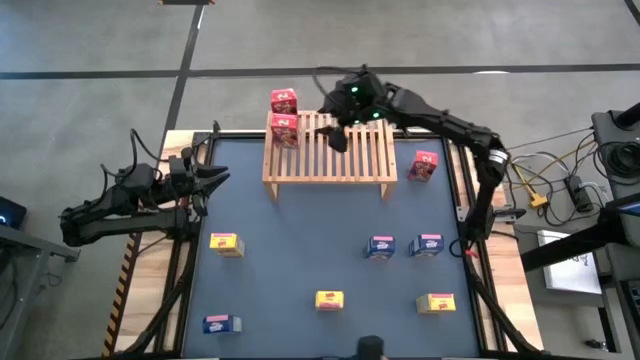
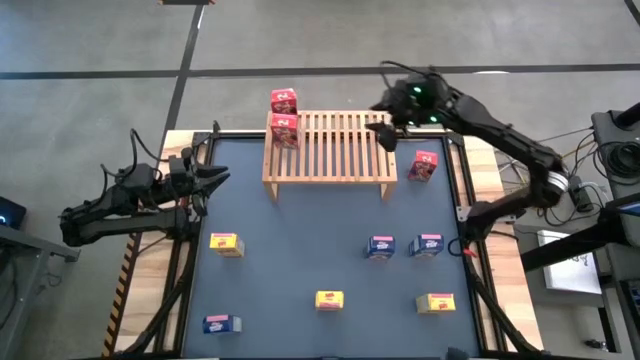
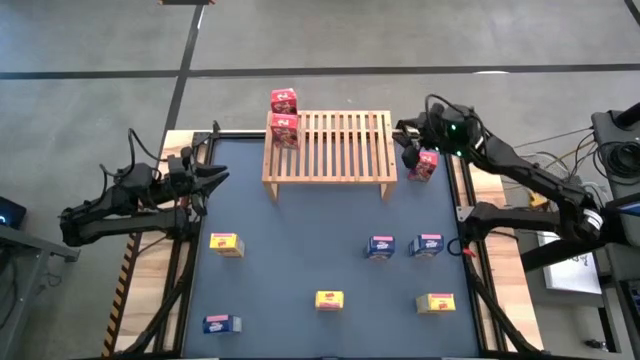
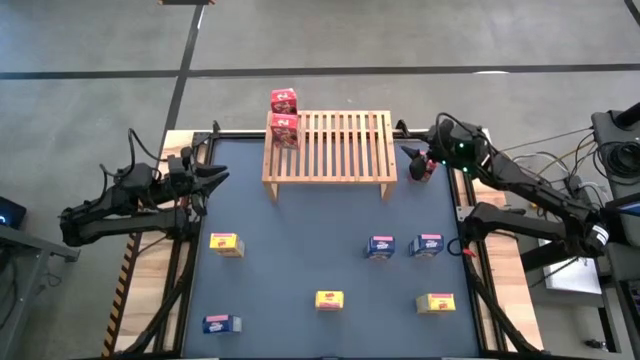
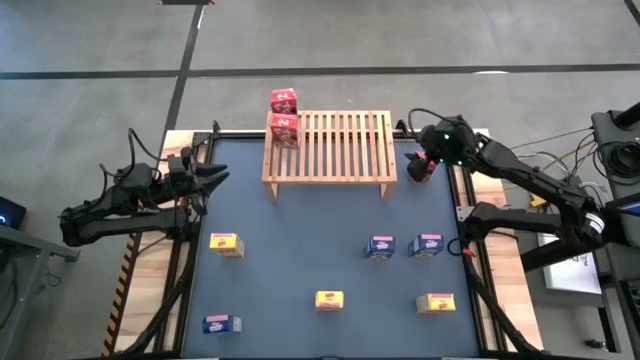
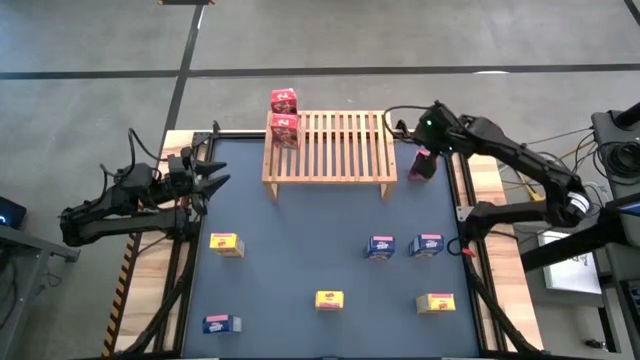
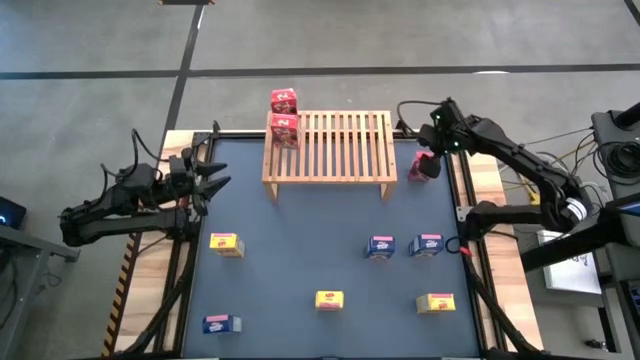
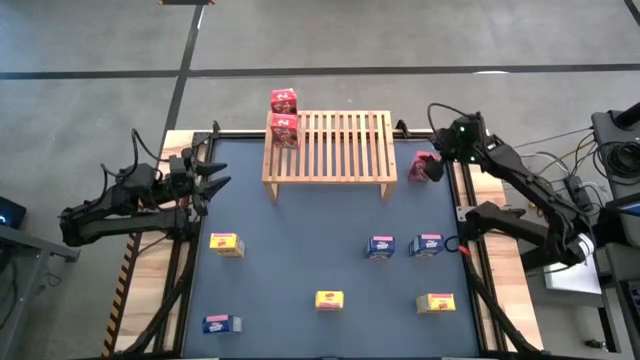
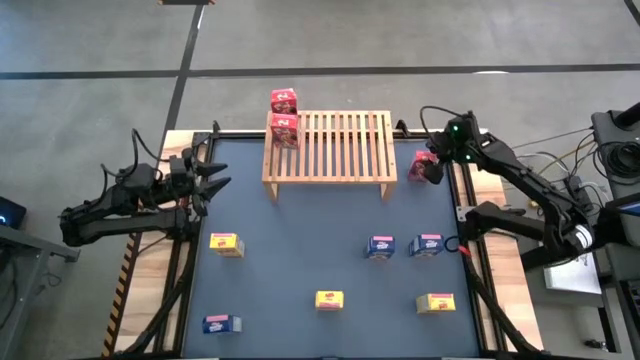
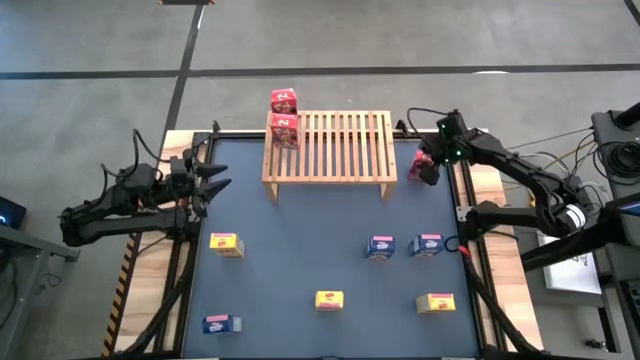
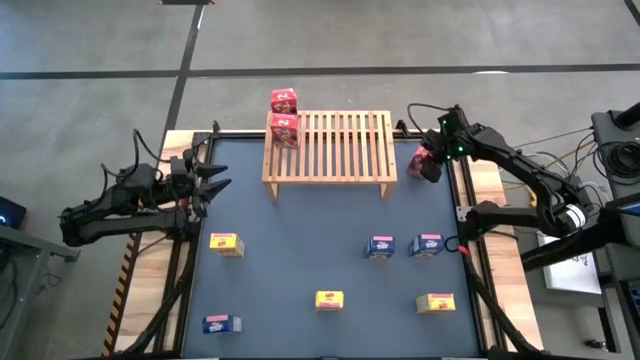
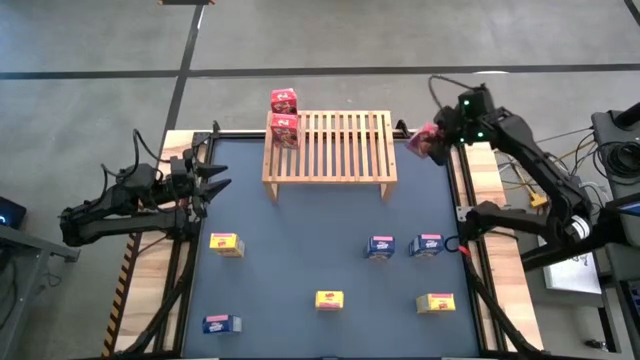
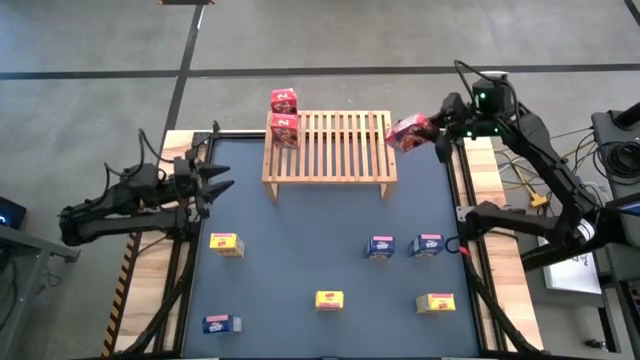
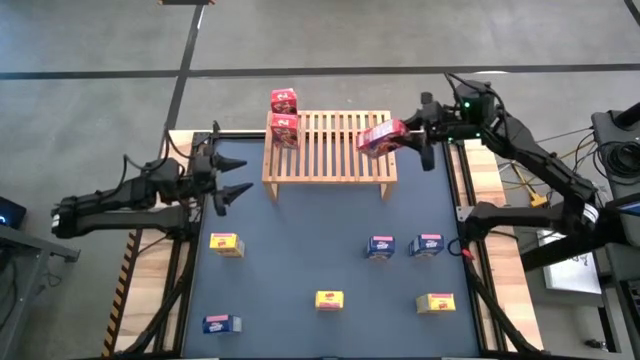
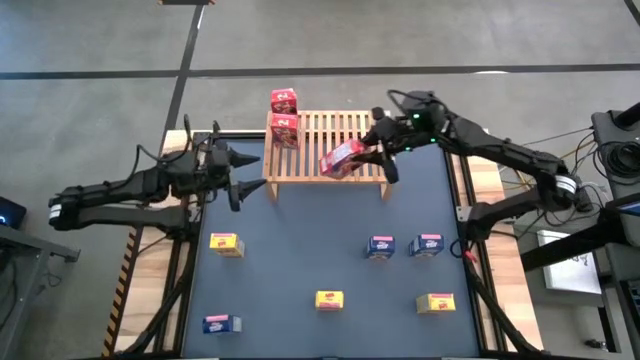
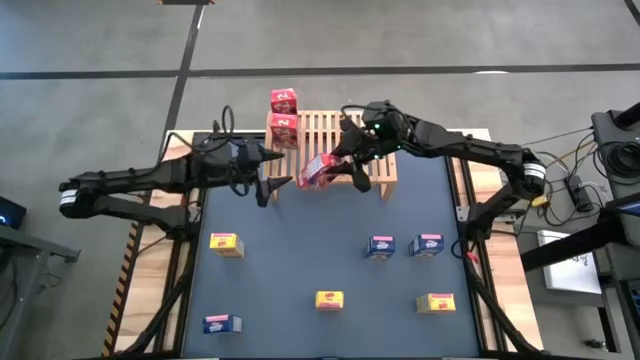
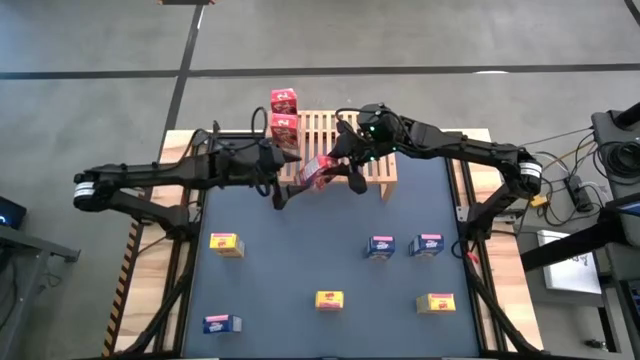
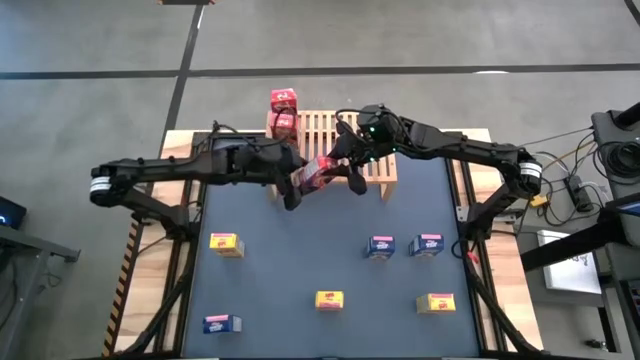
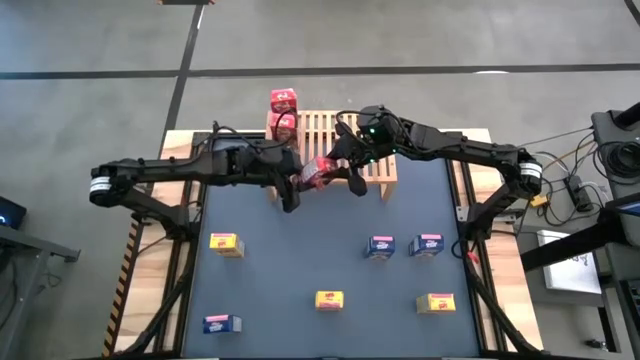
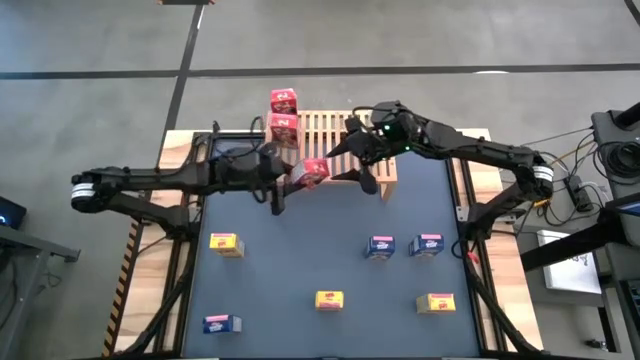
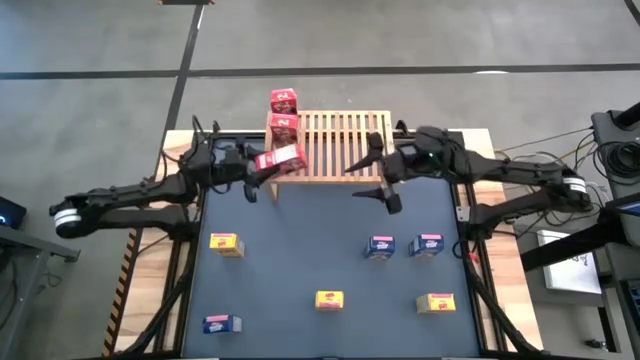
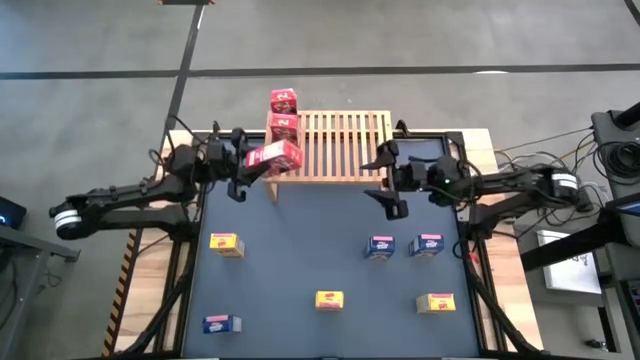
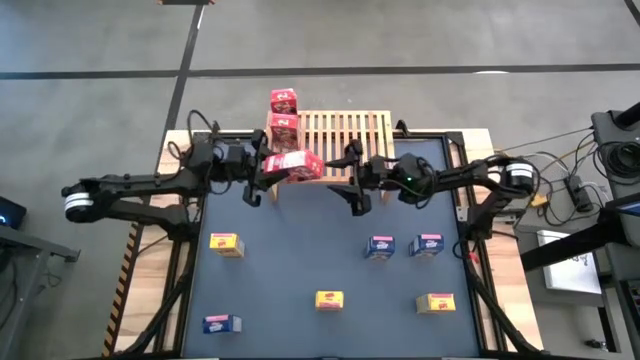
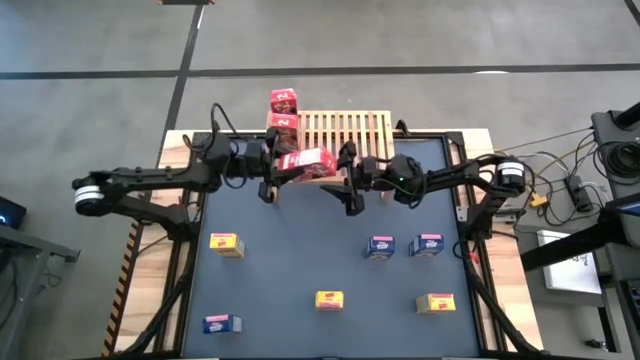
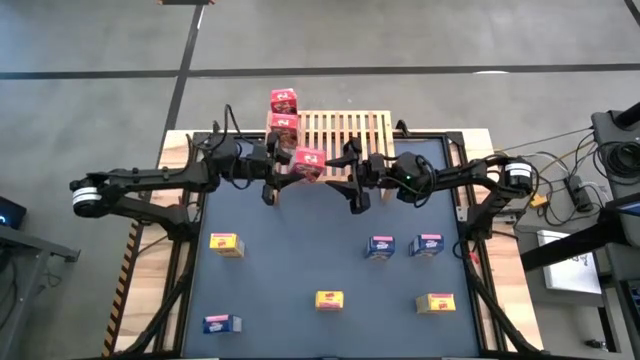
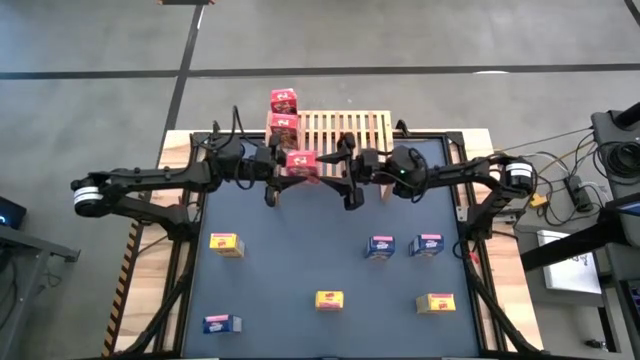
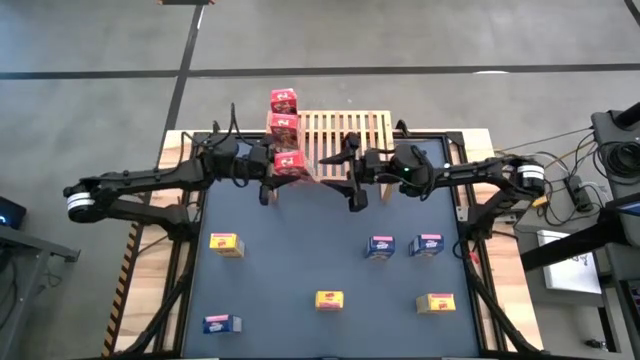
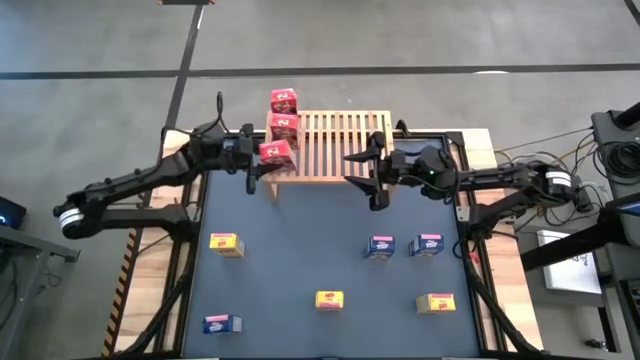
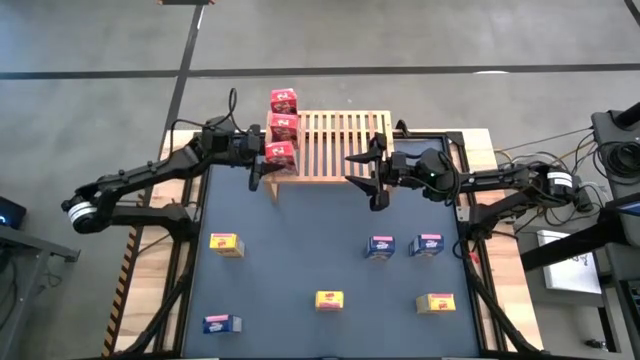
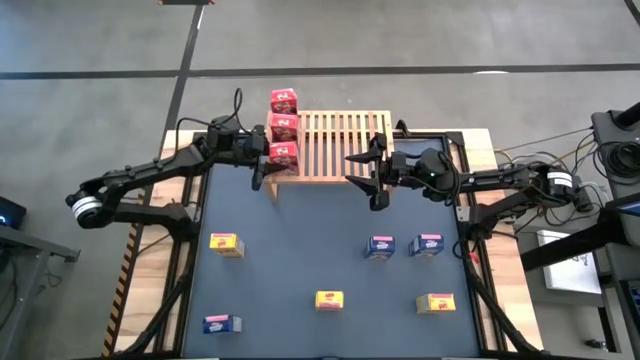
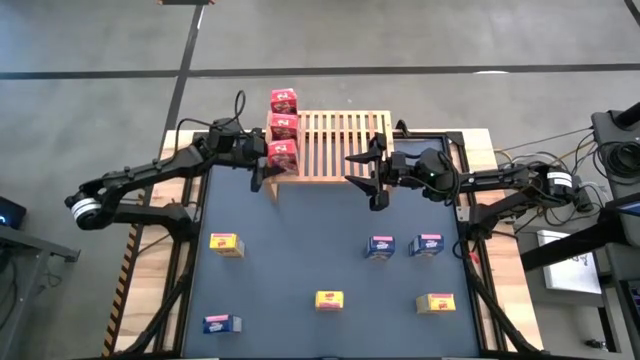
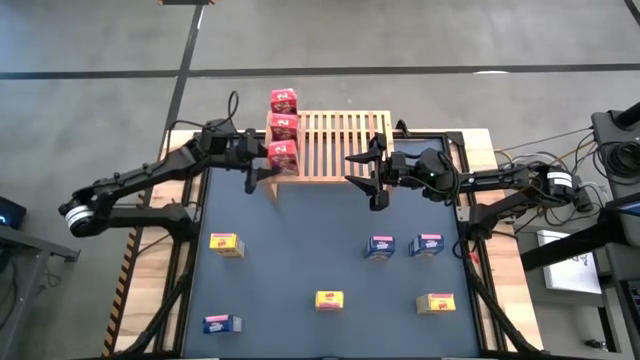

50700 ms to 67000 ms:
Task: Stack cereal on shelf
Put the red cereal box aligned with the other red cereal boxes on the shelf
